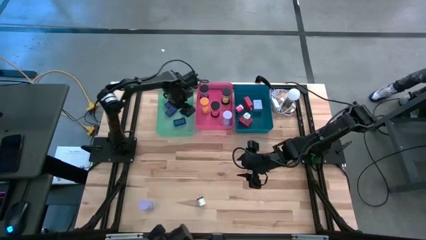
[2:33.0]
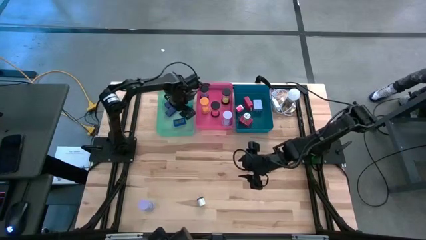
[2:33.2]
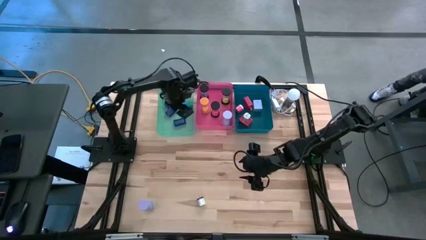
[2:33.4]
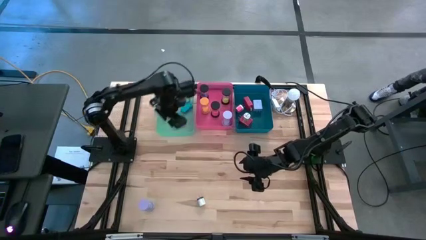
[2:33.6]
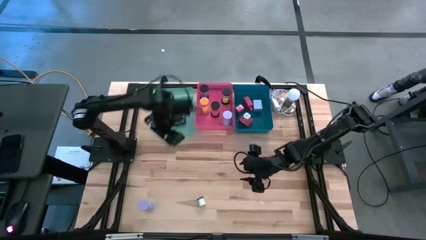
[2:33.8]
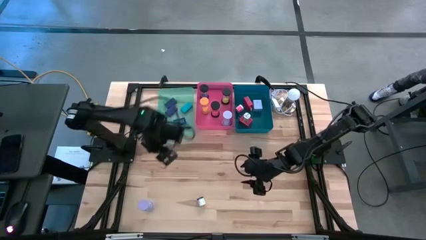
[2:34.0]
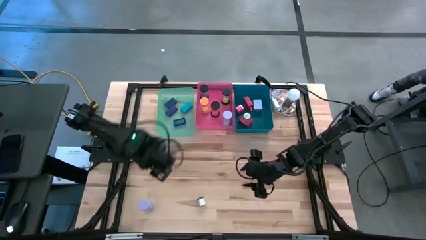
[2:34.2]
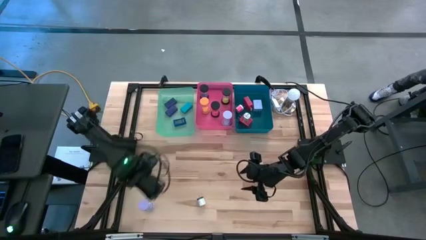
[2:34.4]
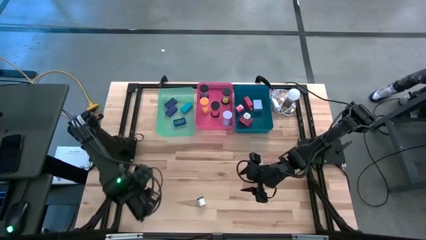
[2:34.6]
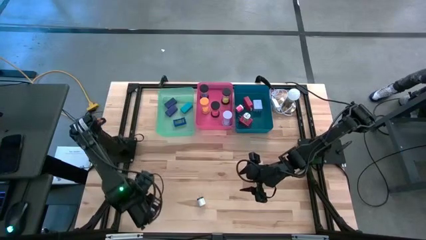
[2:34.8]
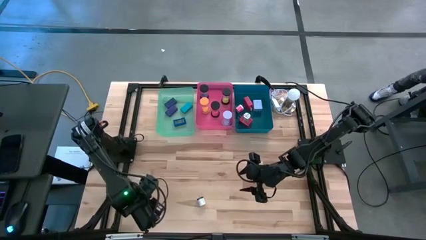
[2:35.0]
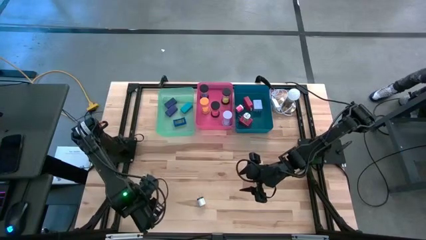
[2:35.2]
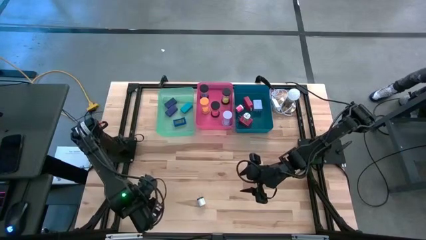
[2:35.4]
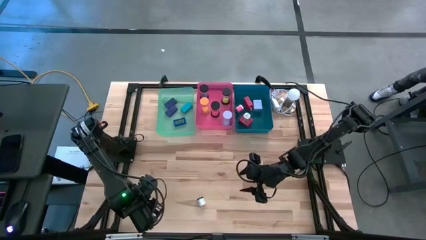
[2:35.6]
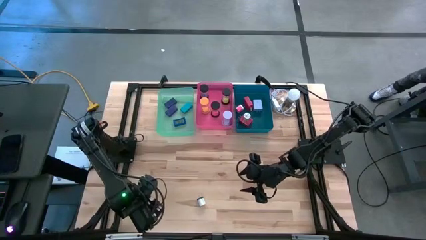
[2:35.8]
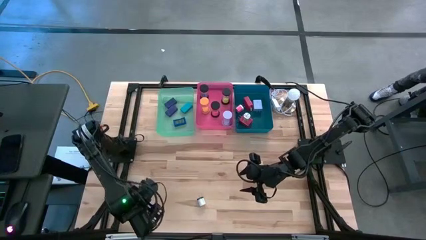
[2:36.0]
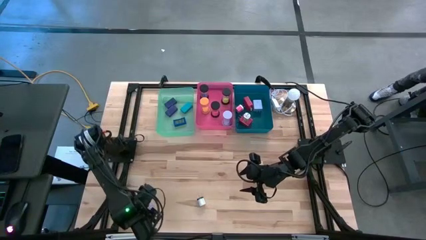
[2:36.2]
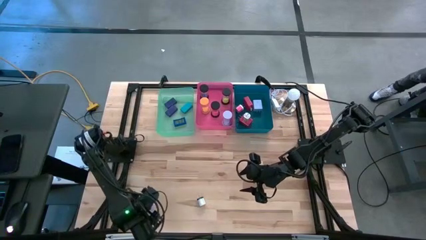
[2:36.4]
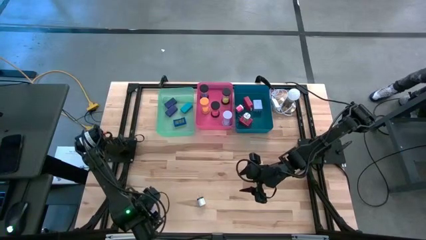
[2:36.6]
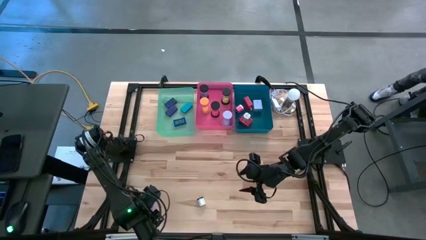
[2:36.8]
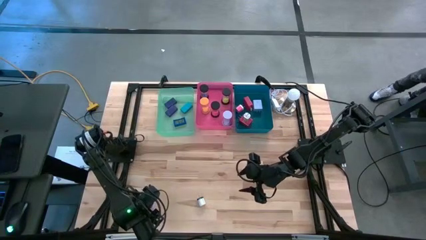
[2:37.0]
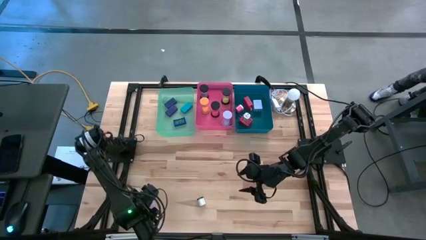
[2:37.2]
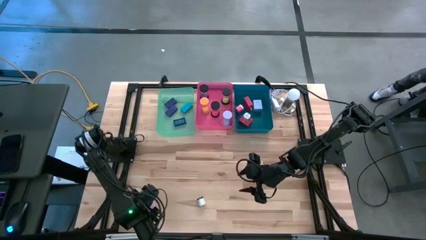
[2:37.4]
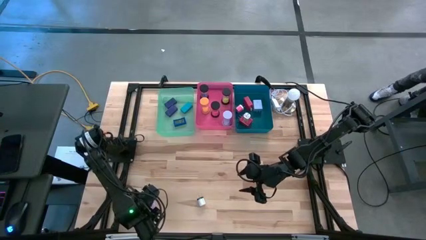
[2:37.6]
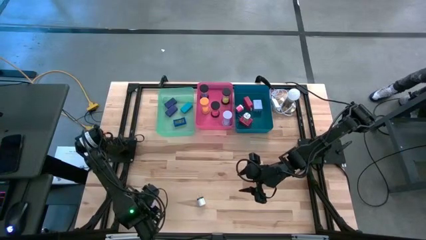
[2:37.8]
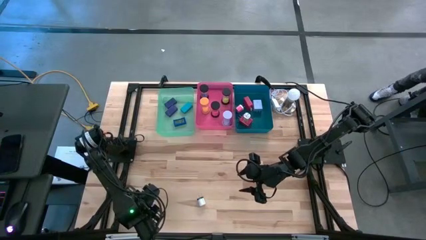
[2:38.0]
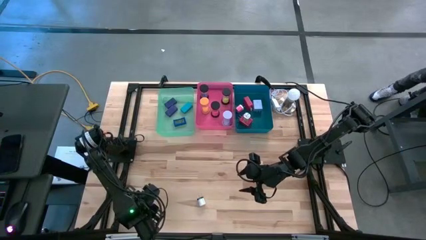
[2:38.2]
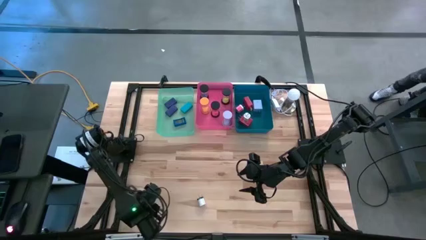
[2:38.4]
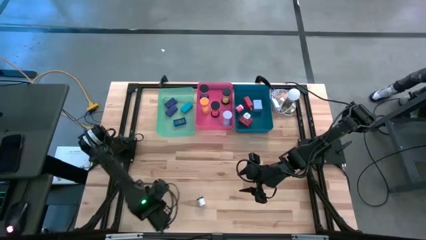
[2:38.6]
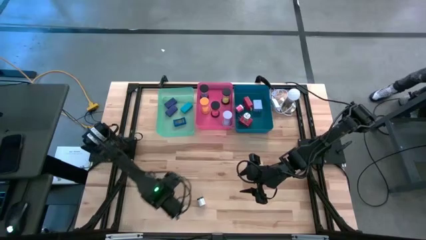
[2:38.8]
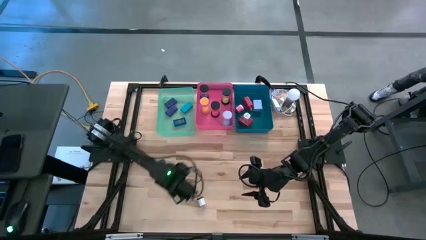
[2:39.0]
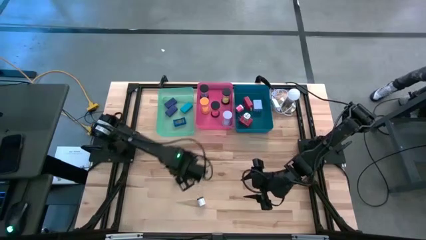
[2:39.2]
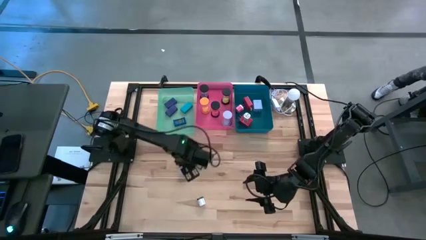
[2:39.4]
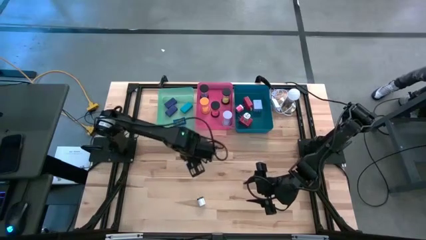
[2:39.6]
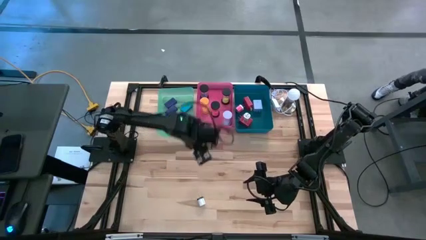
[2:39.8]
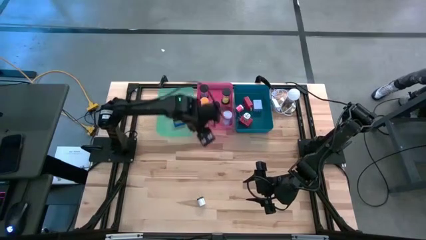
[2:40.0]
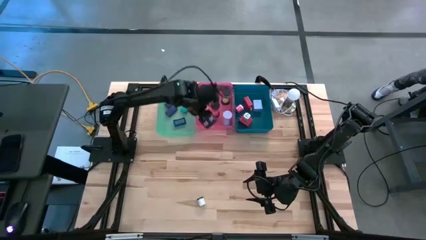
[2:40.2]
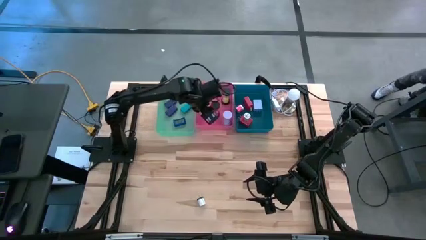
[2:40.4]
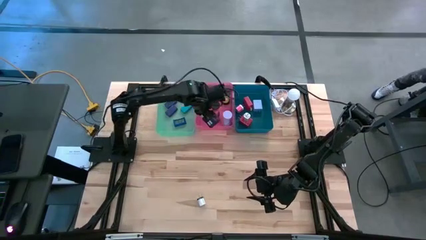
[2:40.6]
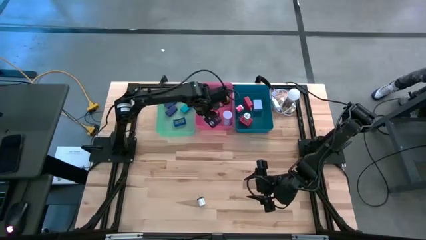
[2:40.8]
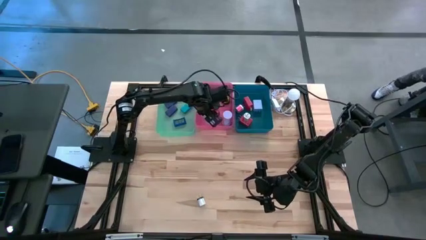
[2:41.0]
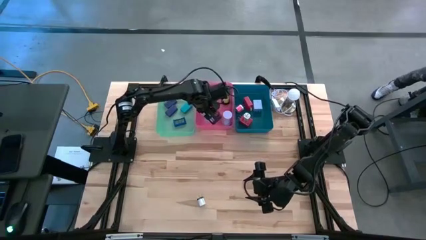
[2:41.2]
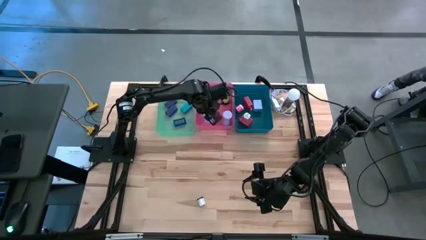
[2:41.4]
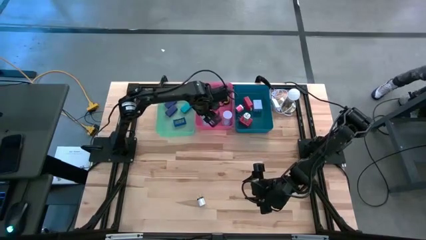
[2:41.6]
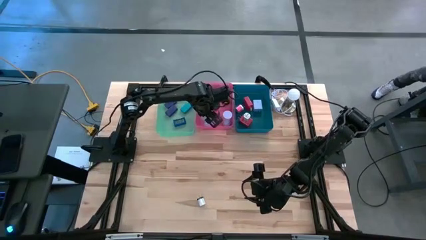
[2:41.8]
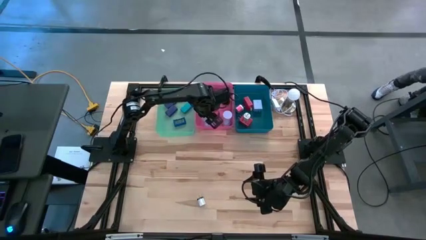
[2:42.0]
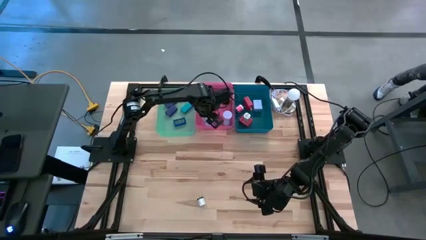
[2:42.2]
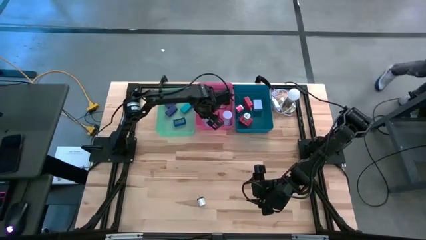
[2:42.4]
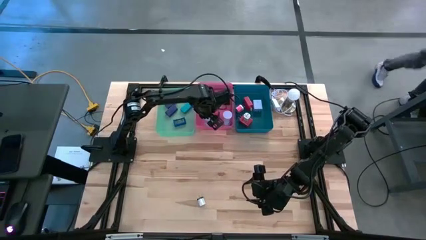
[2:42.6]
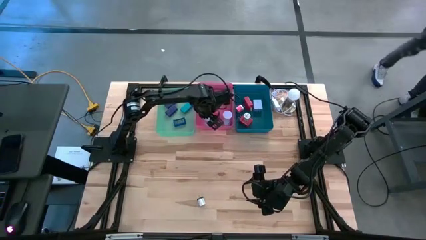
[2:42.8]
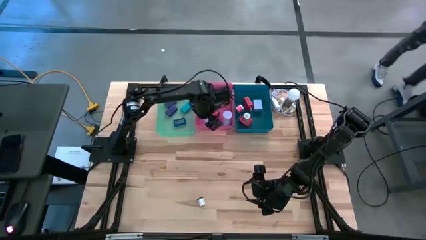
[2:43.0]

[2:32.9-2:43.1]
Task: Pick & Place Office items
Put the violet hourglass into the pink bin

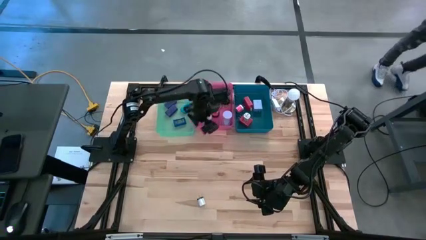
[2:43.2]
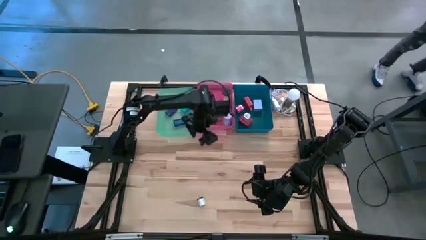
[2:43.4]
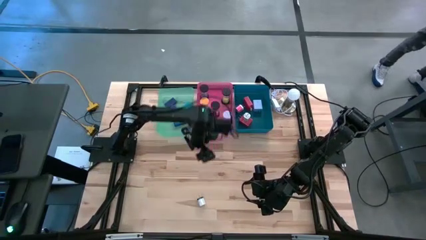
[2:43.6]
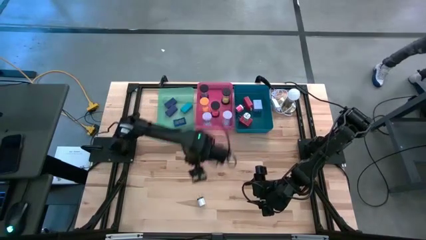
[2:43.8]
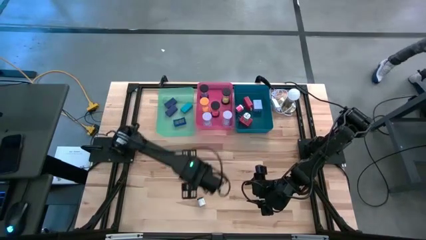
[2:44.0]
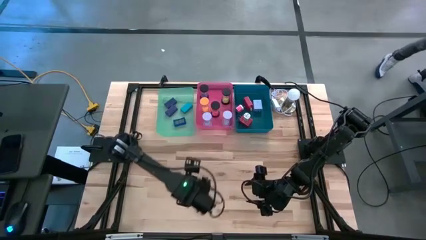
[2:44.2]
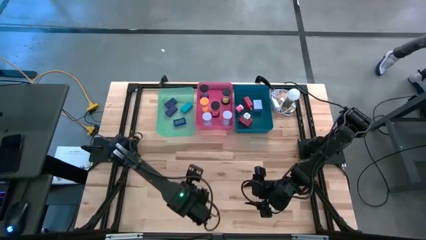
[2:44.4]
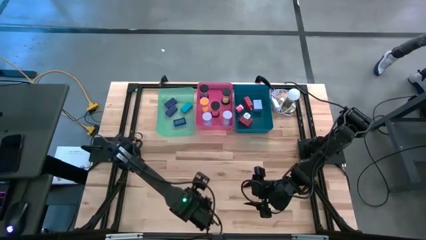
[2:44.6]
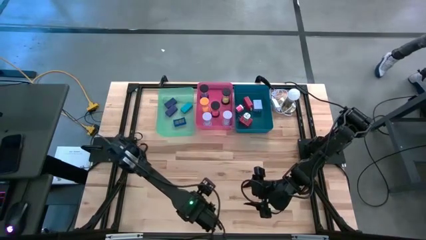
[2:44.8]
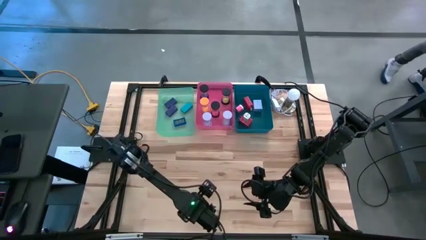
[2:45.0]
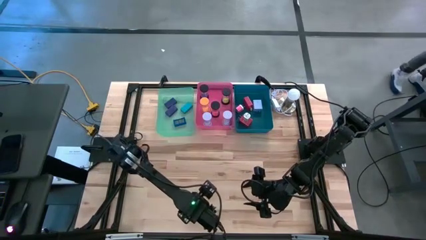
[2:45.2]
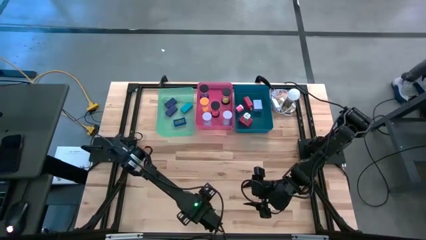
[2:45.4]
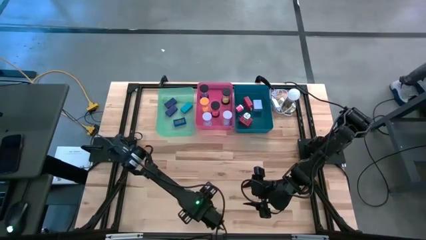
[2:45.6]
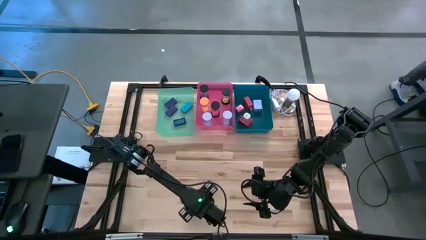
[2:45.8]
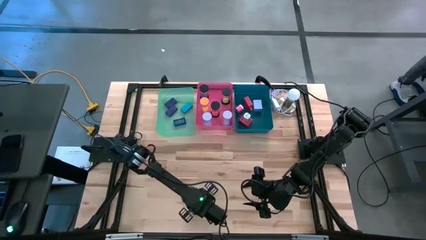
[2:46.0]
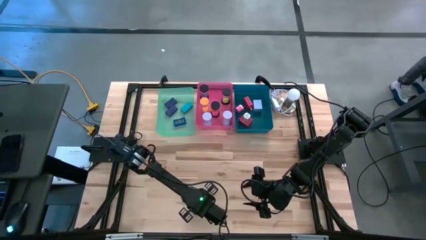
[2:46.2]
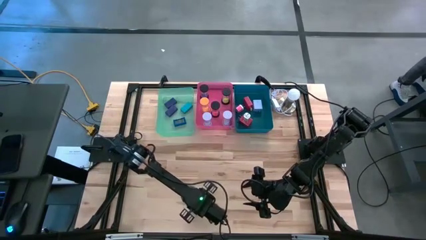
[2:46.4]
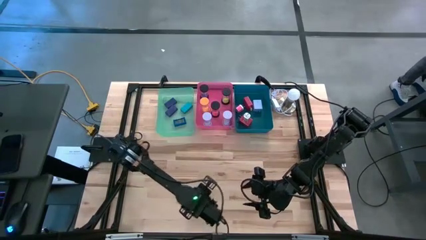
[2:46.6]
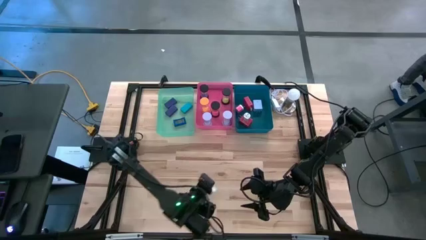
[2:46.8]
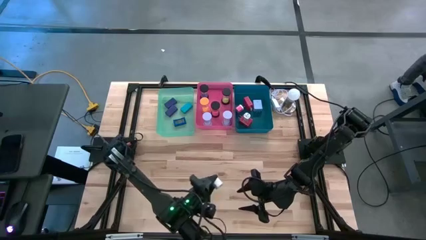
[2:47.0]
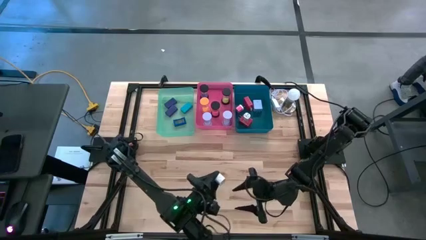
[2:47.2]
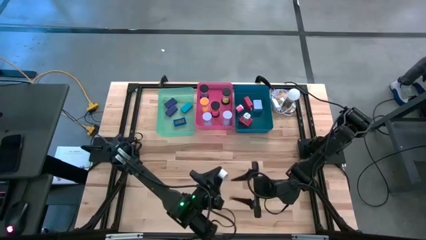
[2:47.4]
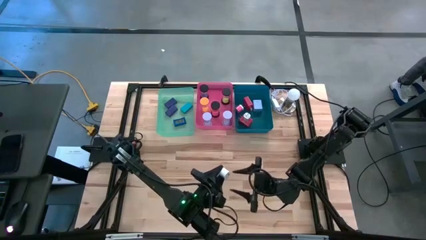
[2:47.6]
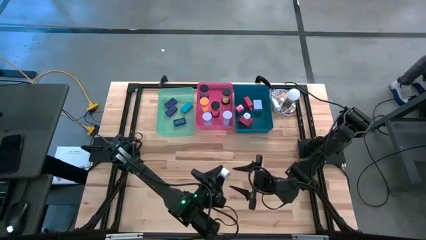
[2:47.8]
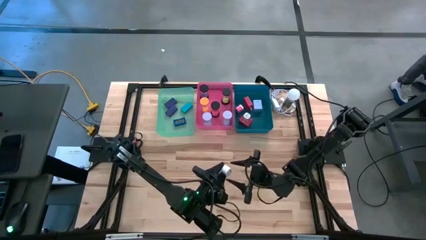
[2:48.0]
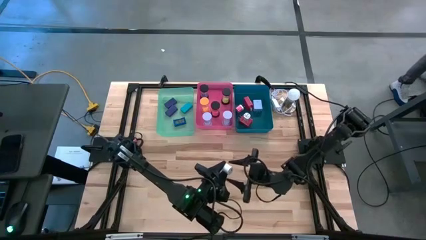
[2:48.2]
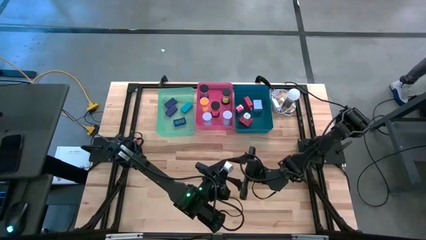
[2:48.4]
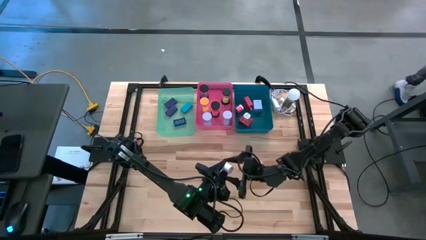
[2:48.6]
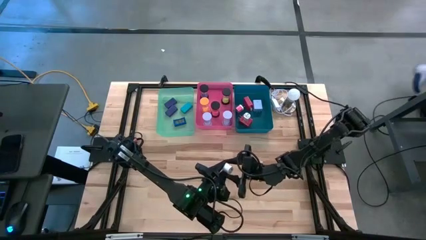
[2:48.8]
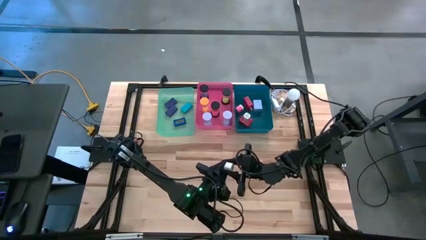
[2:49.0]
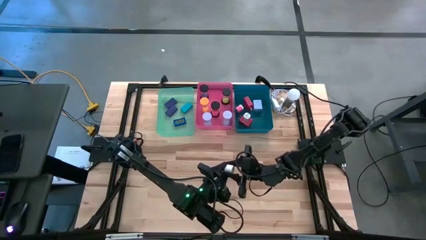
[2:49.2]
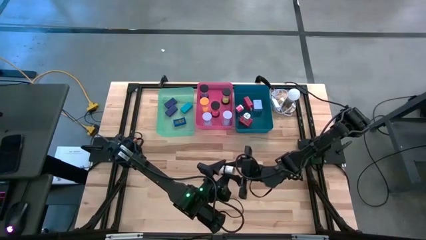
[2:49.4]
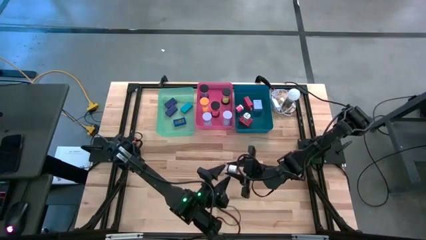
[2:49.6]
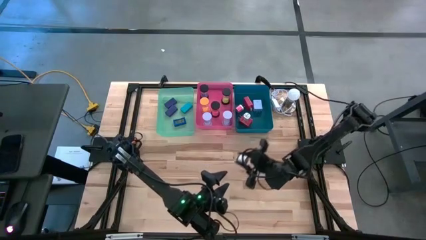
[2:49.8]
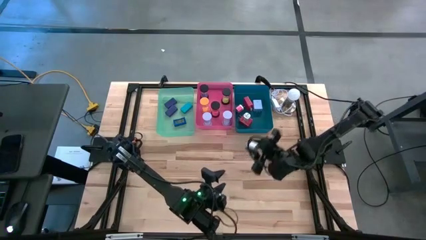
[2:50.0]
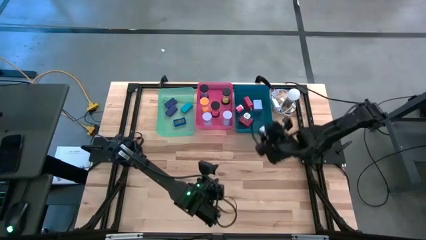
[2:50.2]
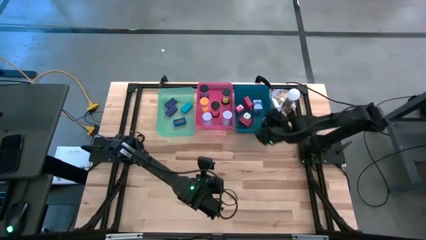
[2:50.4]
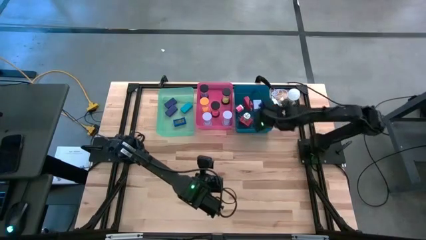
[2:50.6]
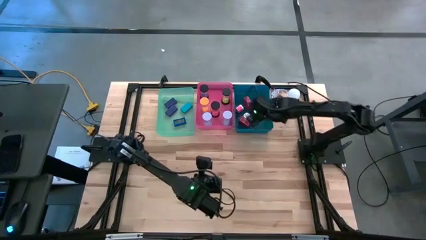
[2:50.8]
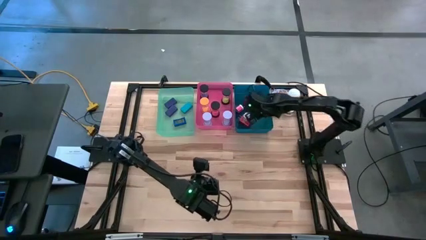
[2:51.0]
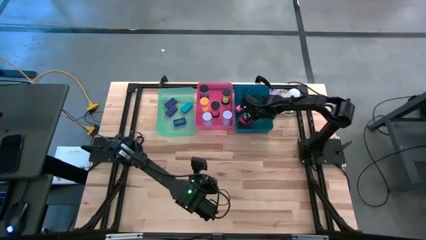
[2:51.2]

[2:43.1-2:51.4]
Put the white charger adapter into the blue bin
